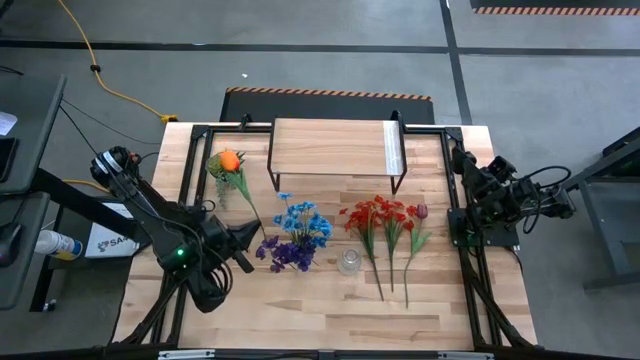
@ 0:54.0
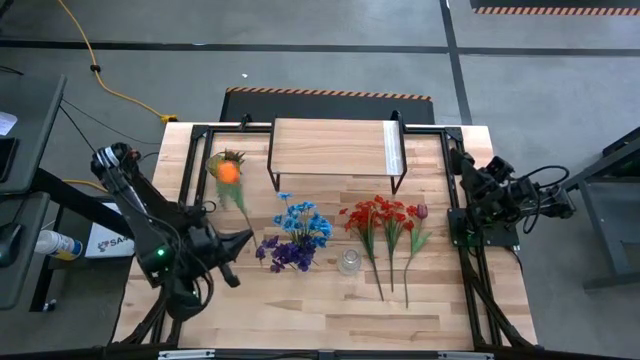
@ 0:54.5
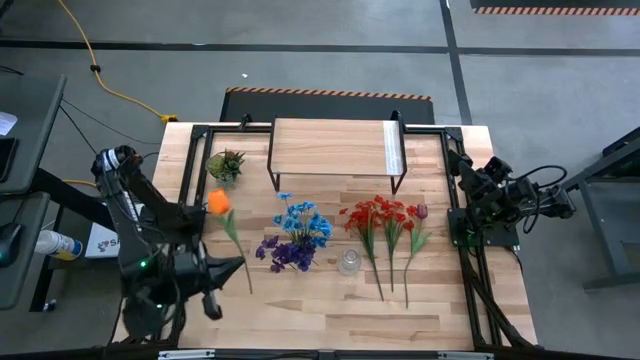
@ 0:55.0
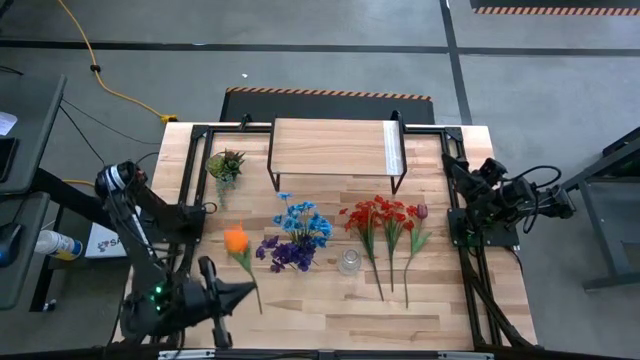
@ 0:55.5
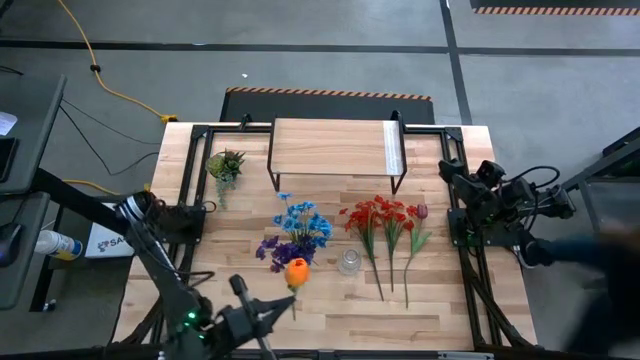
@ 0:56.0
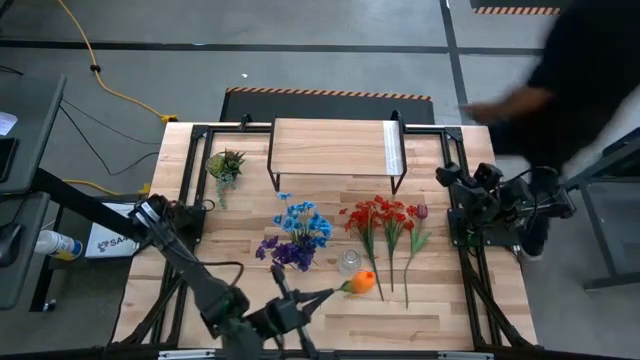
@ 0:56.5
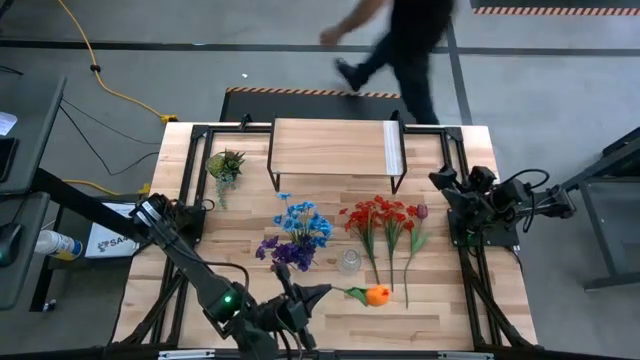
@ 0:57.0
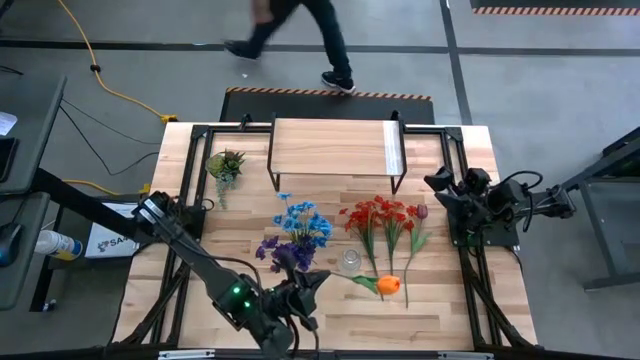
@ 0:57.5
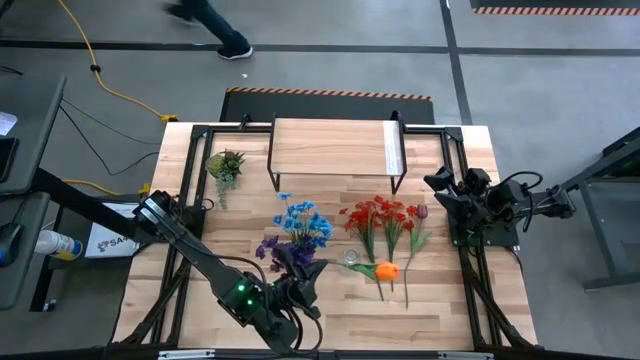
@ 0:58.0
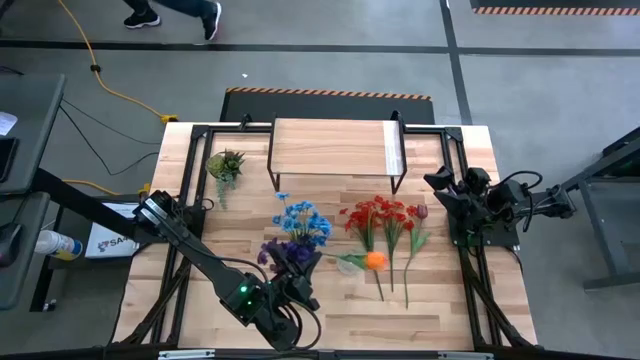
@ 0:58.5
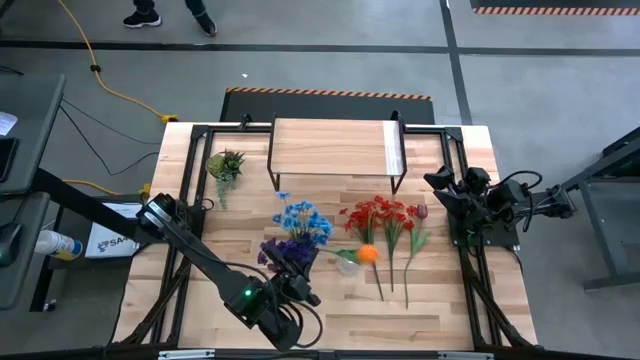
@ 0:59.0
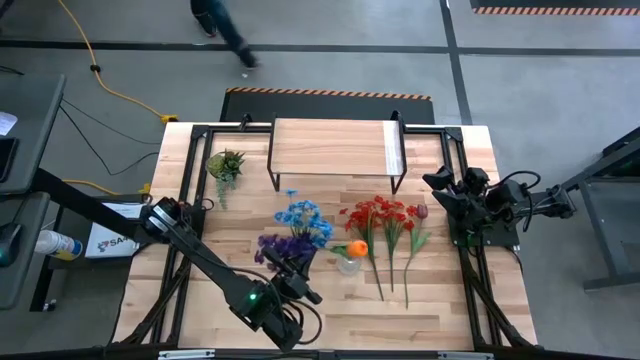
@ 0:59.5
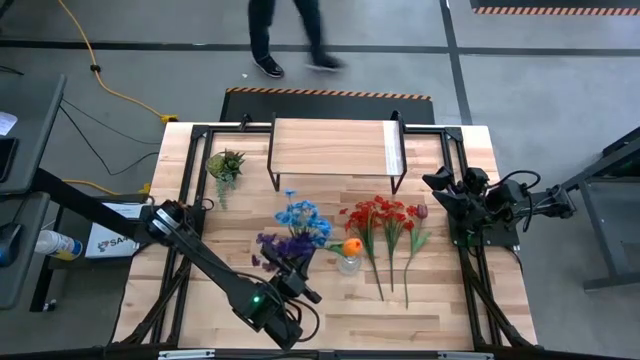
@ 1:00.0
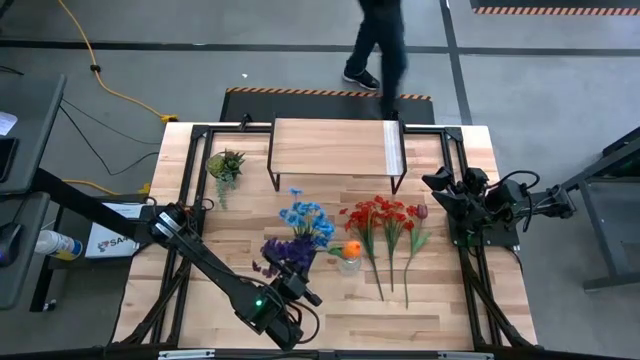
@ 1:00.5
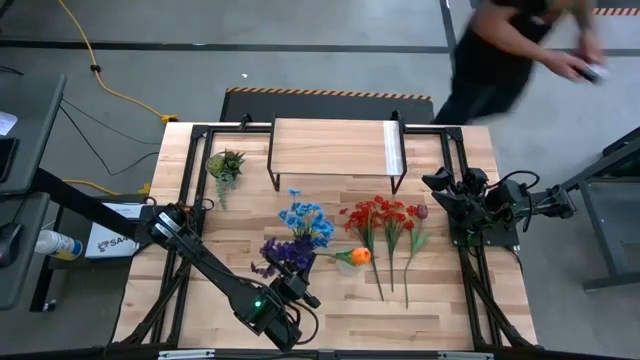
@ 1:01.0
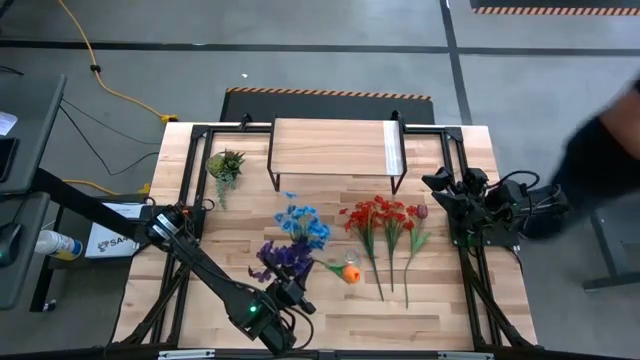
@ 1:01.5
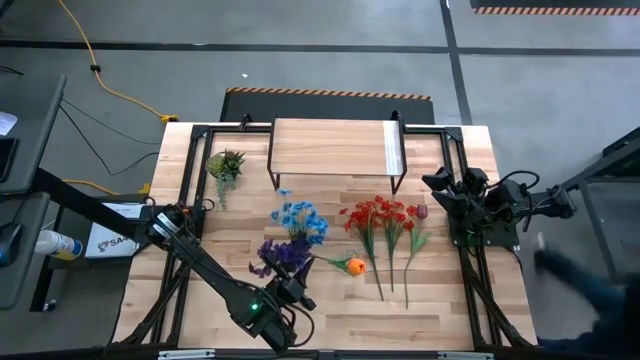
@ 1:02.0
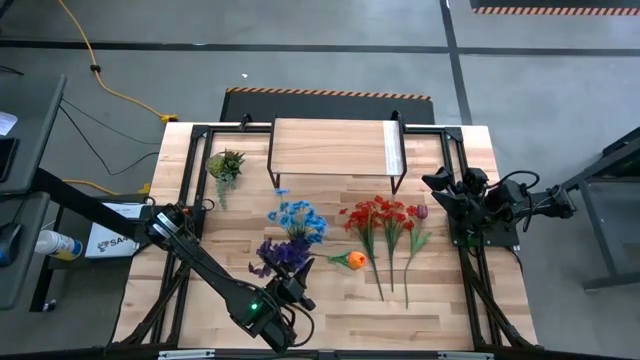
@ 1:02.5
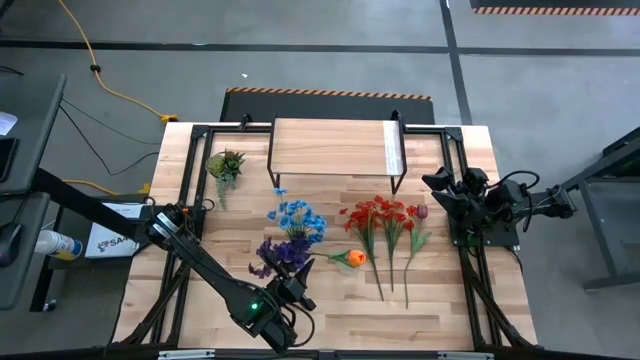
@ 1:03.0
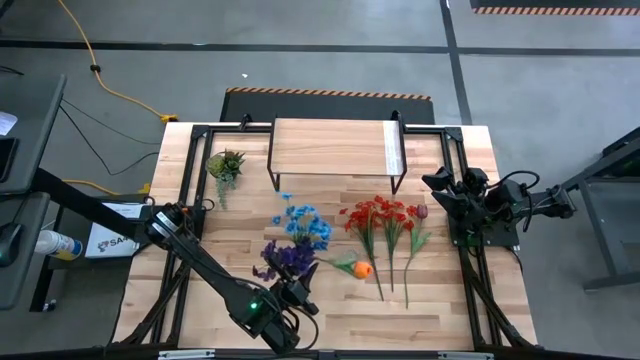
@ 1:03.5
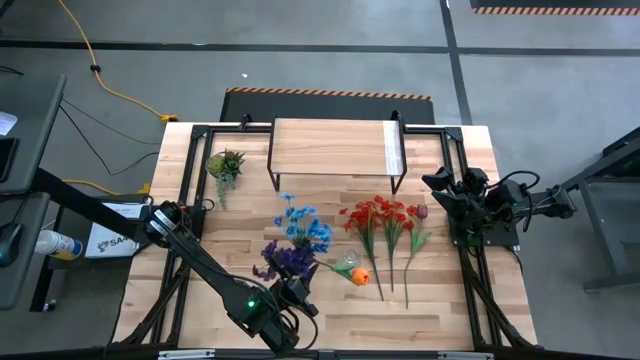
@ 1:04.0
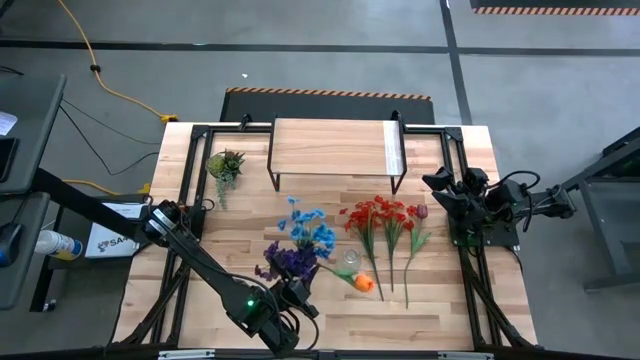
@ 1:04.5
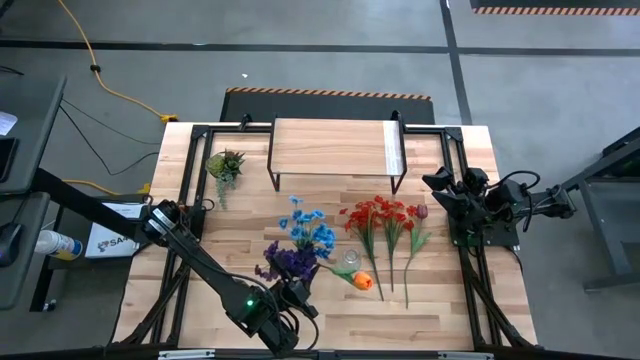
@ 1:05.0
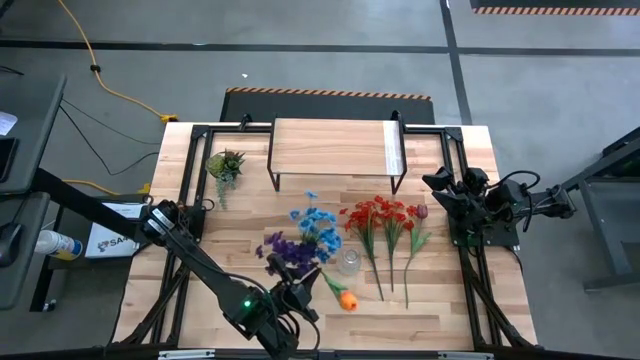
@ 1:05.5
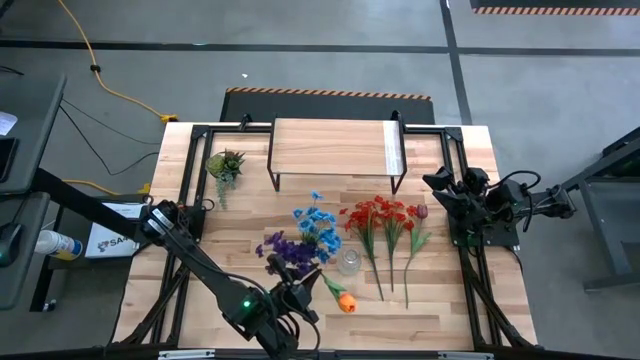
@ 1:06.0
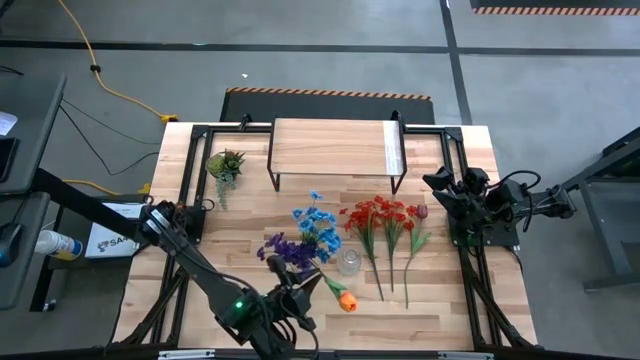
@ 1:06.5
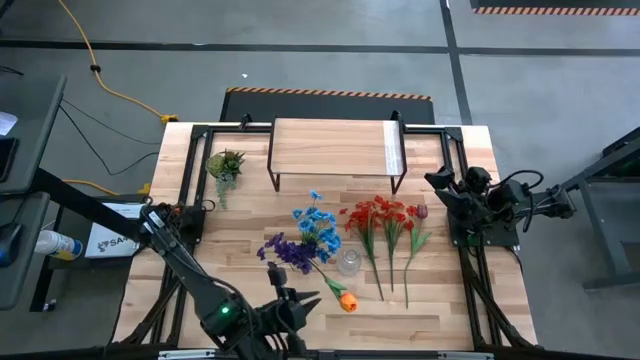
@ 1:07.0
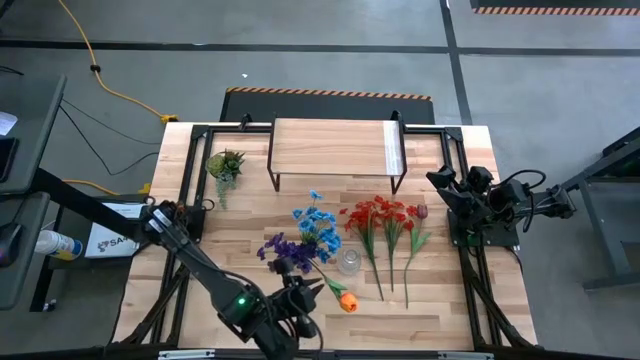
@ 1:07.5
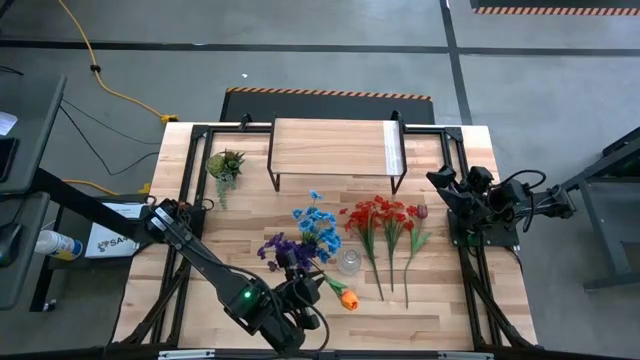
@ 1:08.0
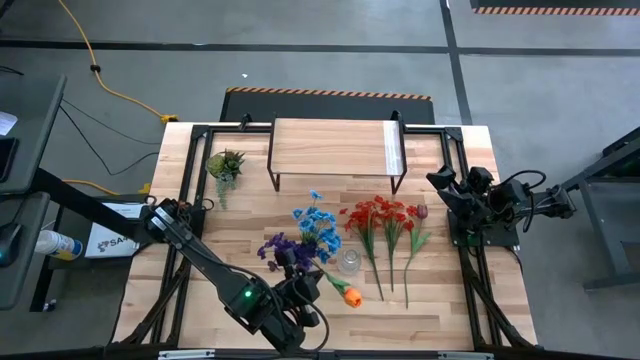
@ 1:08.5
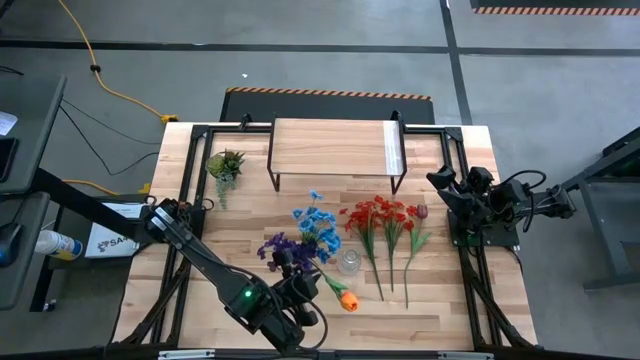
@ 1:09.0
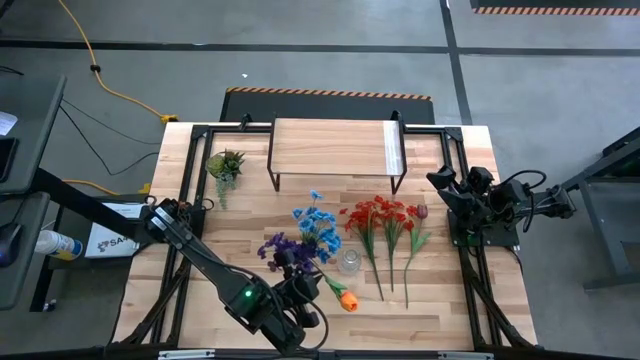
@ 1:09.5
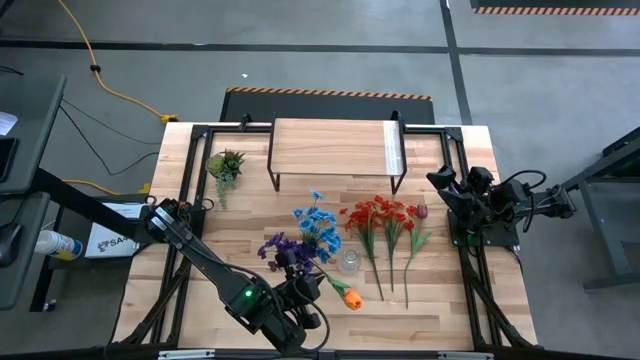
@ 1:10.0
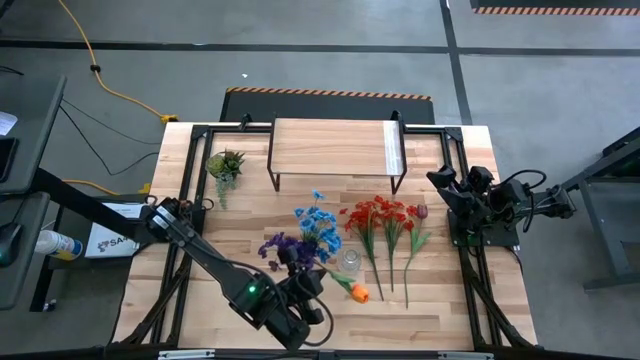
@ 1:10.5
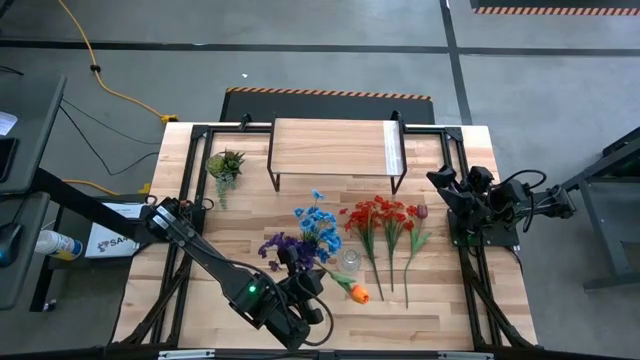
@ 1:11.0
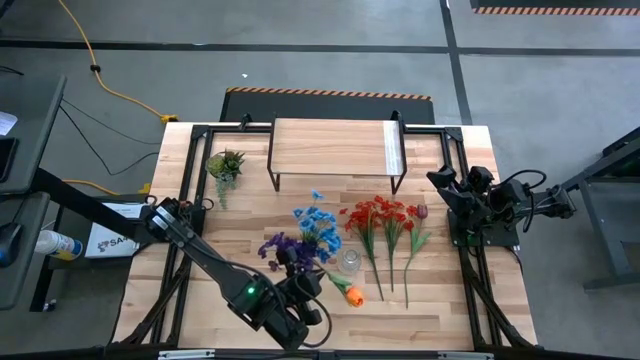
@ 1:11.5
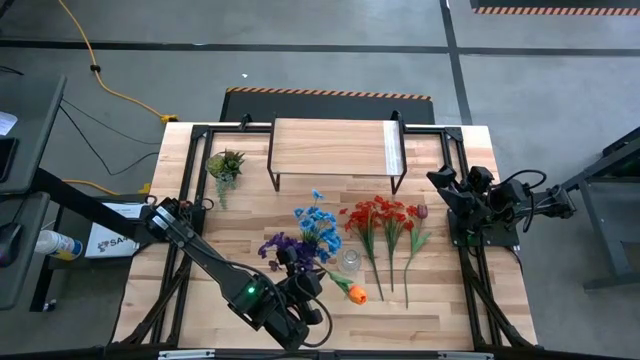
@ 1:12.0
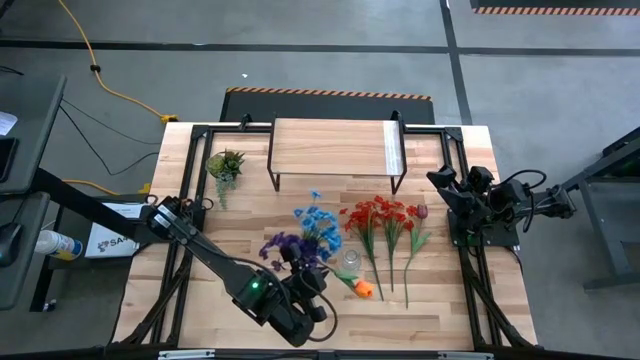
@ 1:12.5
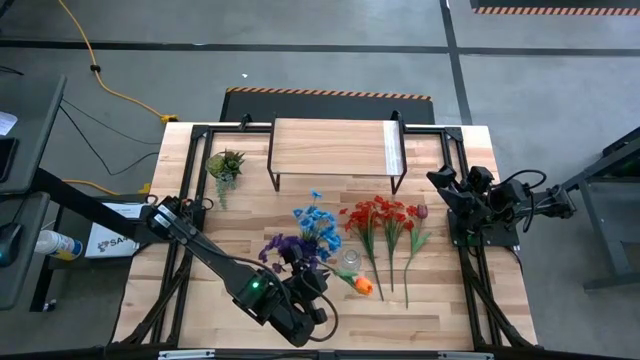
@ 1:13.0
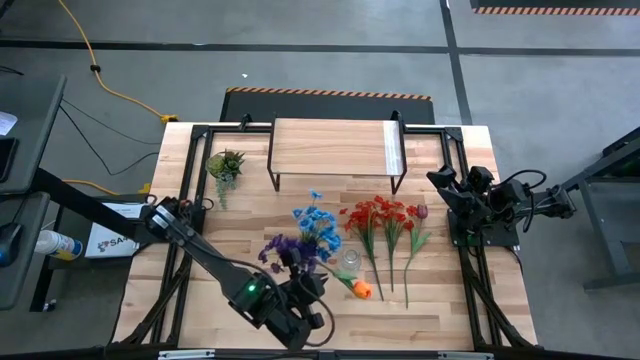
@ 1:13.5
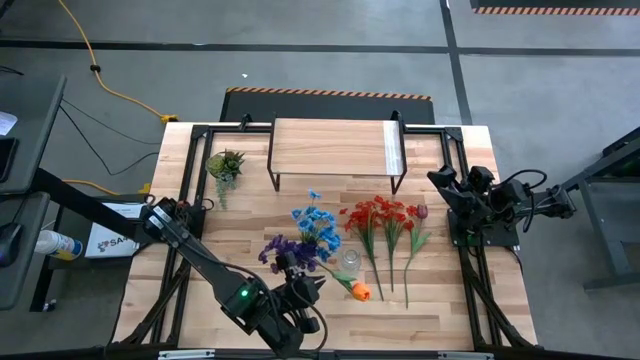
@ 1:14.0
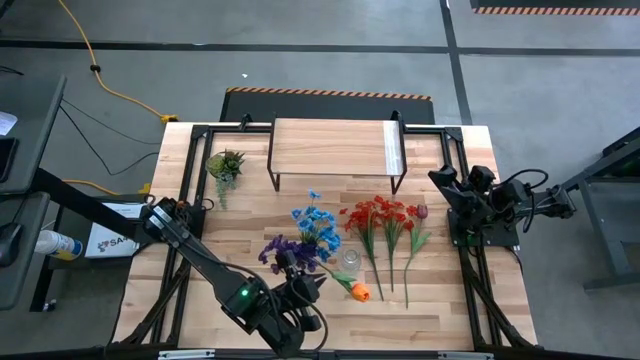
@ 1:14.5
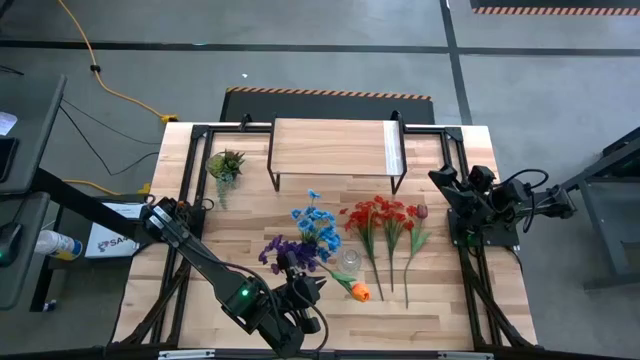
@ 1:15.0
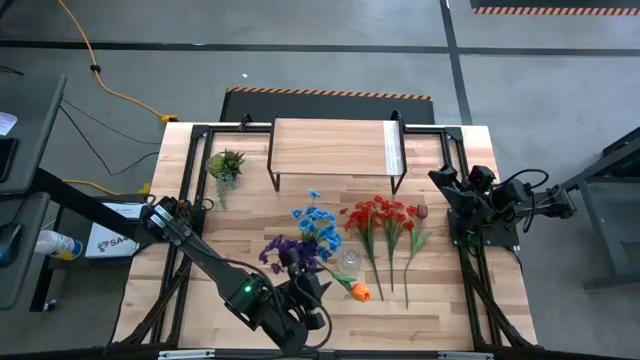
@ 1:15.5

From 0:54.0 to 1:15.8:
Task: Pick and place flowers into a vace then onto a shelf
Put the orange flower into the left transparent flower vase

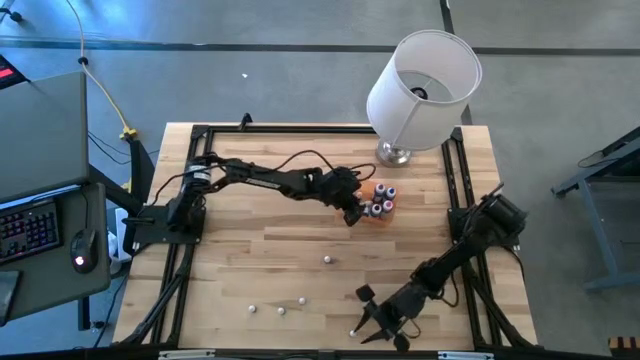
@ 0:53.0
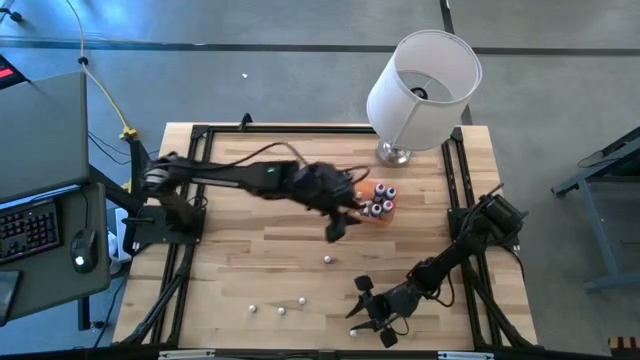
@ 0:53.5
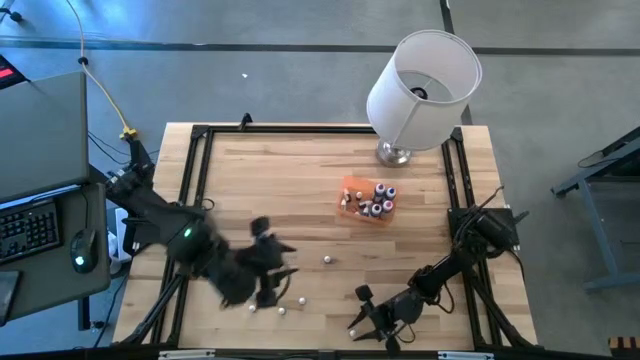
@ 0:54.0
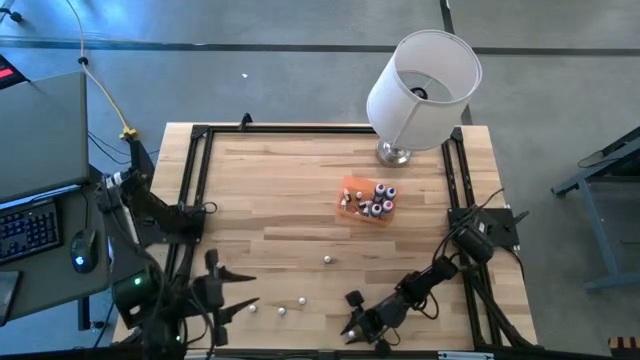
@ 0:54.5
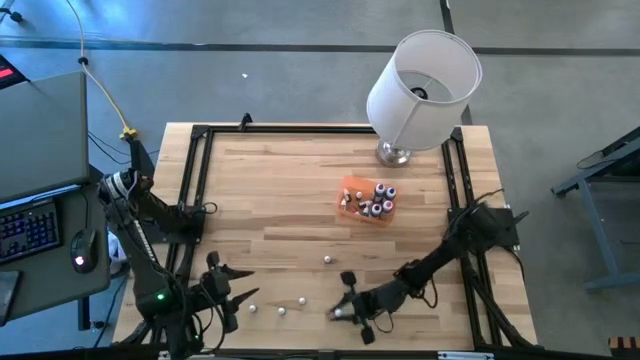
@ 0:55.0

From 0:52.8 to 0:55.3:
Task: Pick & Place food coloring
Put the small green food coloring bottle into the orange container
